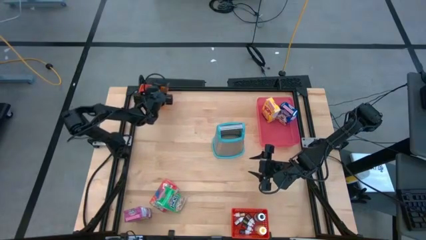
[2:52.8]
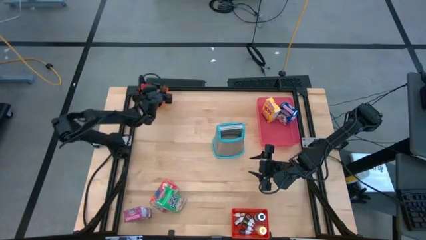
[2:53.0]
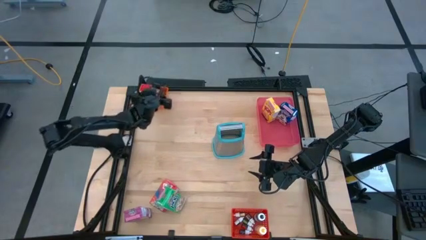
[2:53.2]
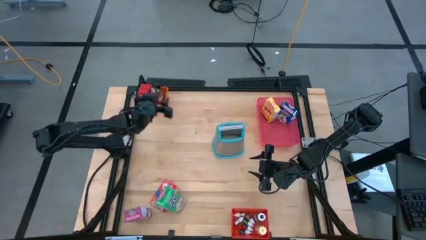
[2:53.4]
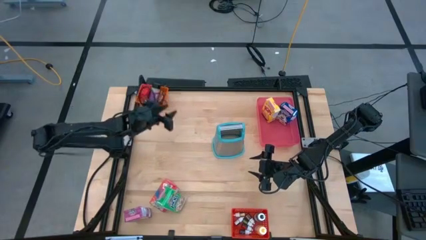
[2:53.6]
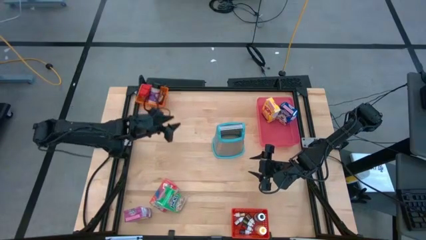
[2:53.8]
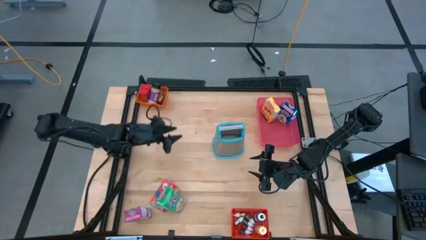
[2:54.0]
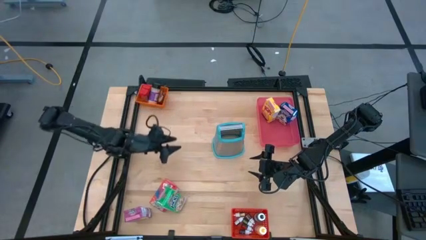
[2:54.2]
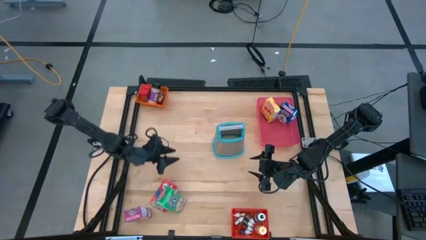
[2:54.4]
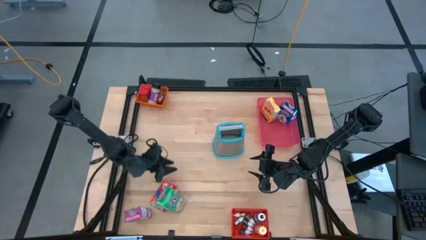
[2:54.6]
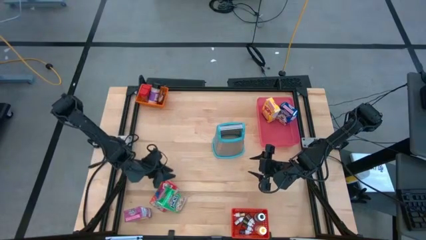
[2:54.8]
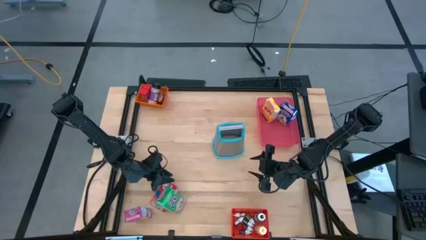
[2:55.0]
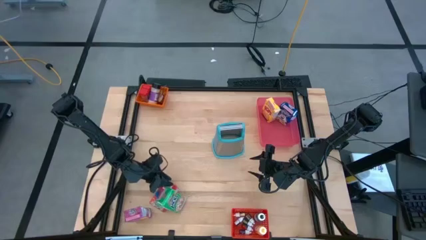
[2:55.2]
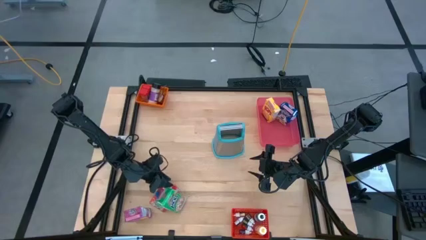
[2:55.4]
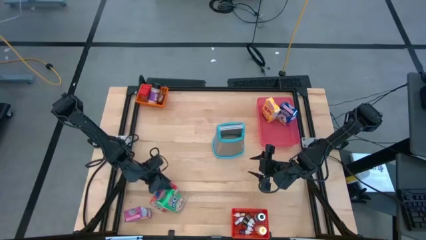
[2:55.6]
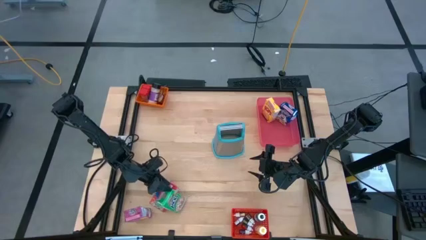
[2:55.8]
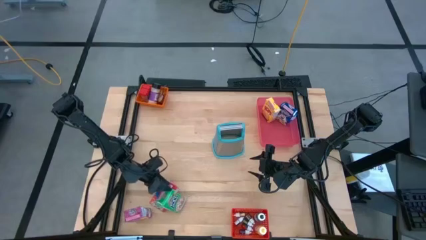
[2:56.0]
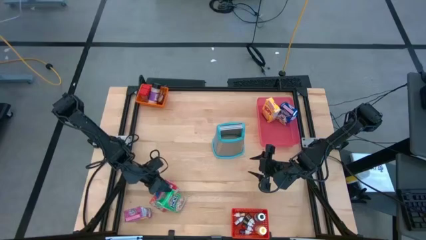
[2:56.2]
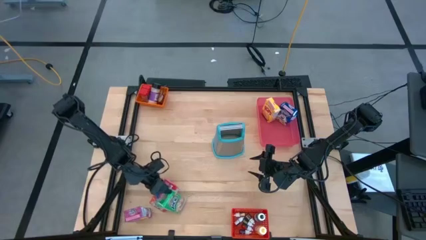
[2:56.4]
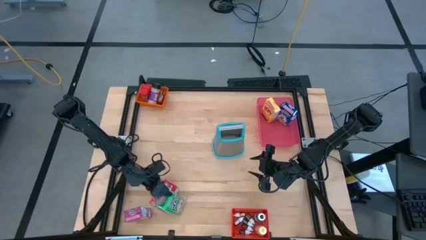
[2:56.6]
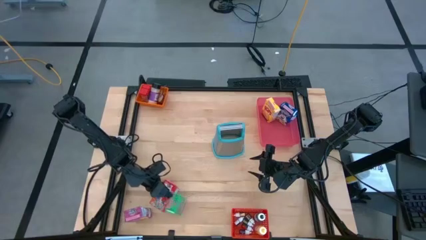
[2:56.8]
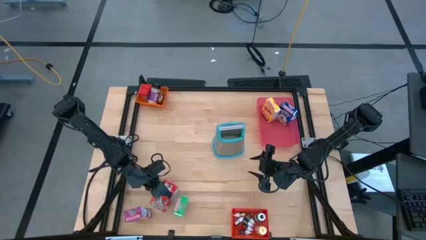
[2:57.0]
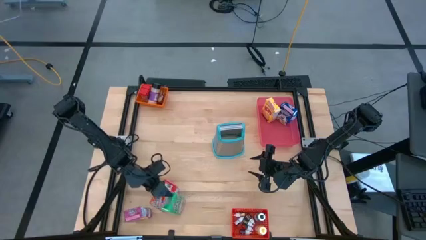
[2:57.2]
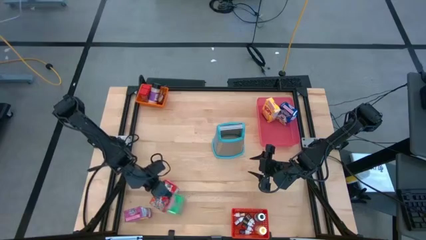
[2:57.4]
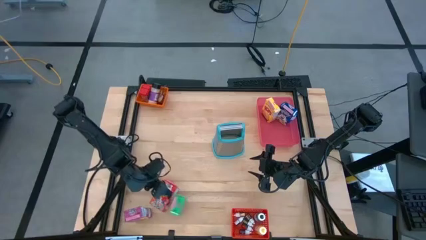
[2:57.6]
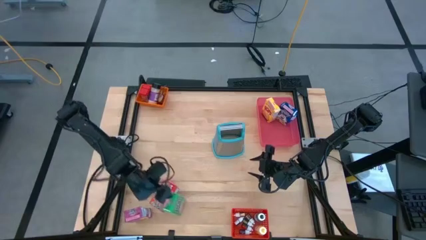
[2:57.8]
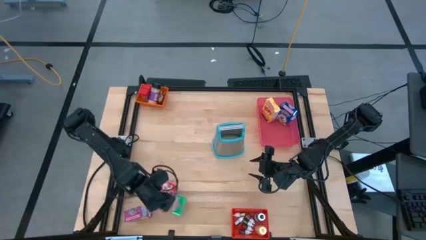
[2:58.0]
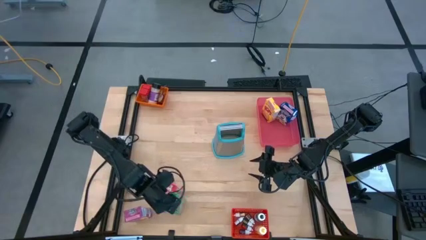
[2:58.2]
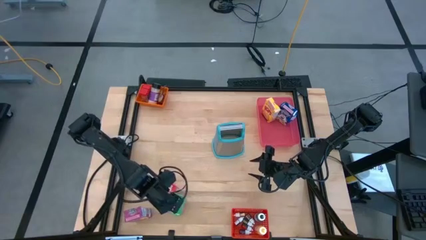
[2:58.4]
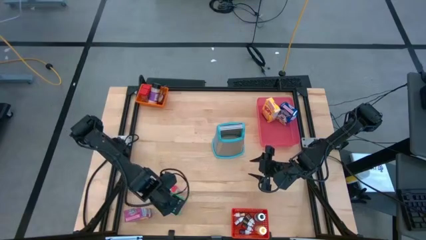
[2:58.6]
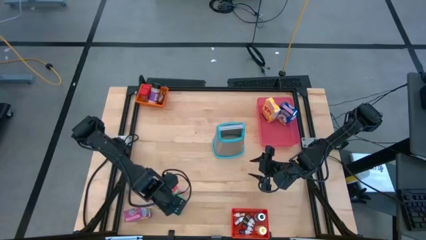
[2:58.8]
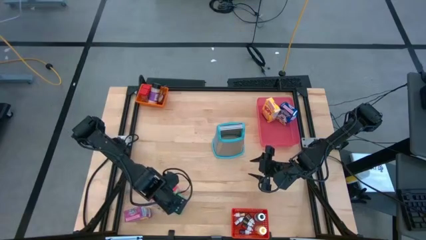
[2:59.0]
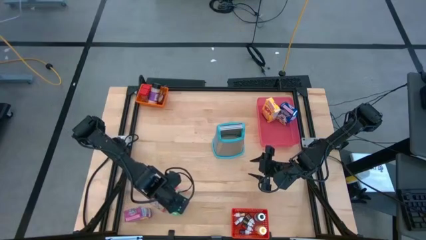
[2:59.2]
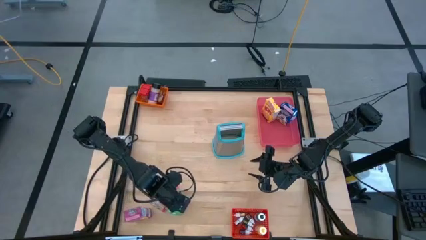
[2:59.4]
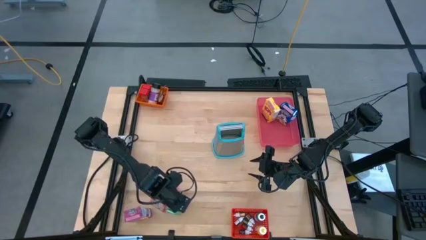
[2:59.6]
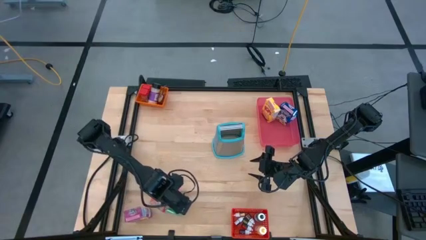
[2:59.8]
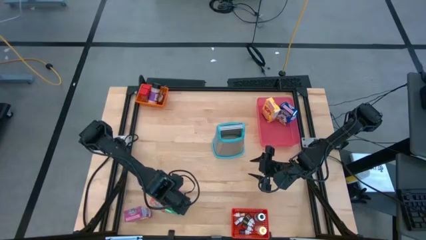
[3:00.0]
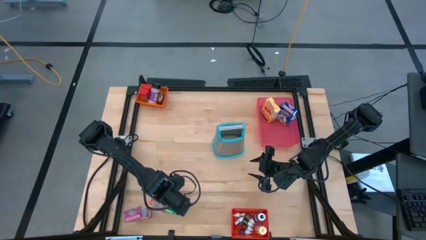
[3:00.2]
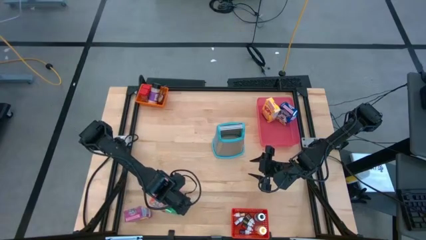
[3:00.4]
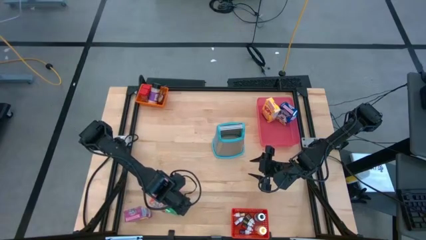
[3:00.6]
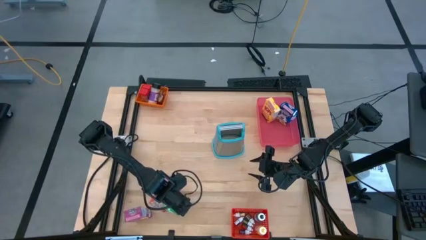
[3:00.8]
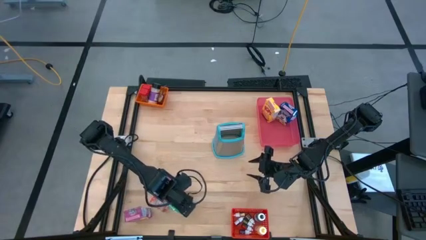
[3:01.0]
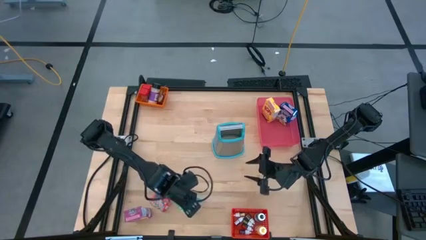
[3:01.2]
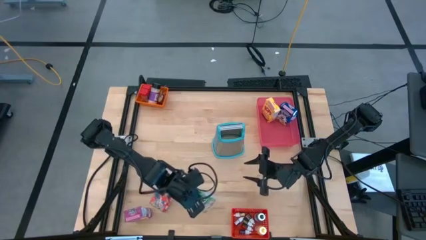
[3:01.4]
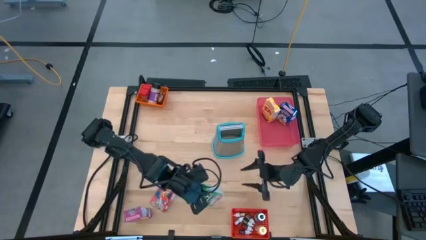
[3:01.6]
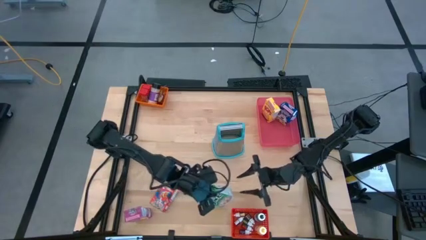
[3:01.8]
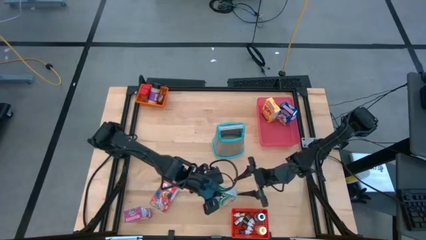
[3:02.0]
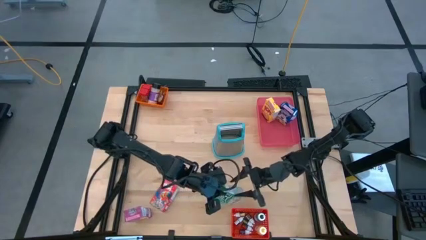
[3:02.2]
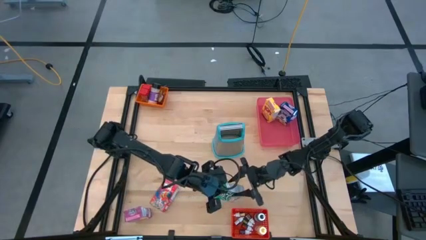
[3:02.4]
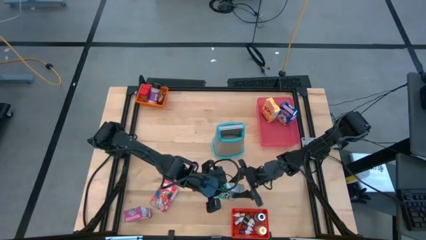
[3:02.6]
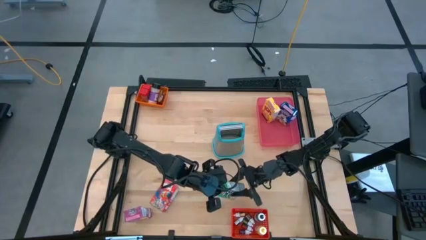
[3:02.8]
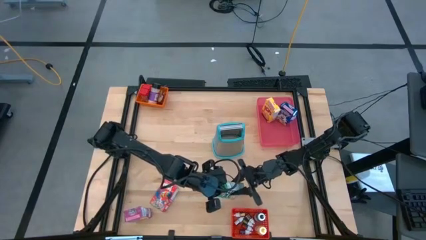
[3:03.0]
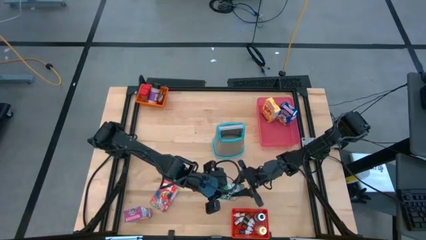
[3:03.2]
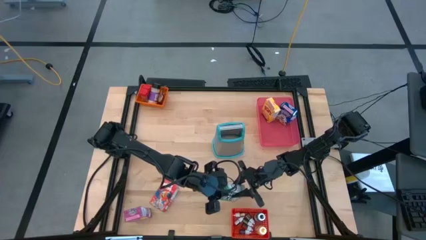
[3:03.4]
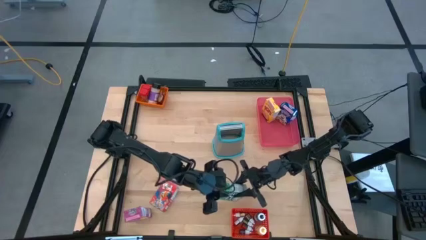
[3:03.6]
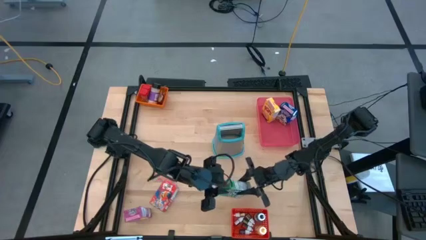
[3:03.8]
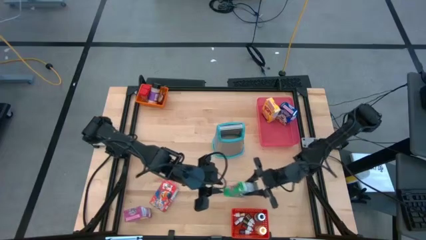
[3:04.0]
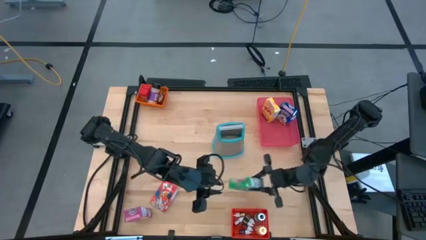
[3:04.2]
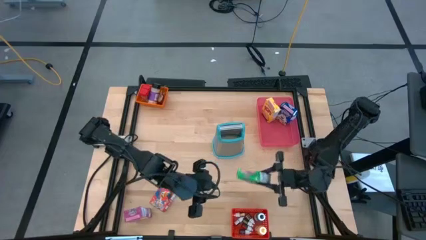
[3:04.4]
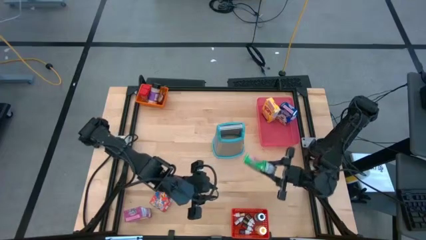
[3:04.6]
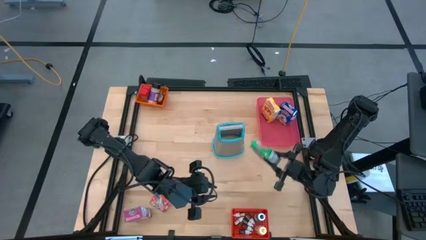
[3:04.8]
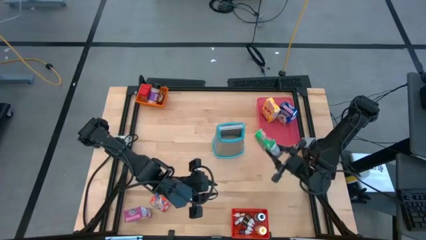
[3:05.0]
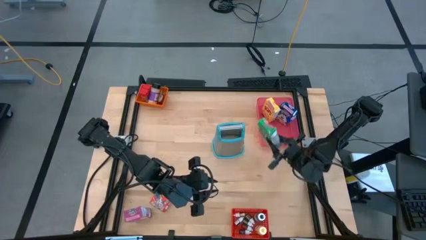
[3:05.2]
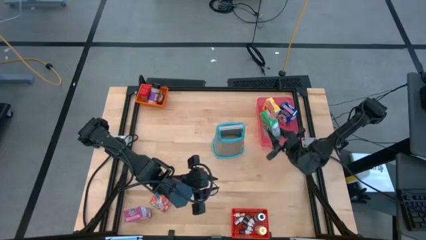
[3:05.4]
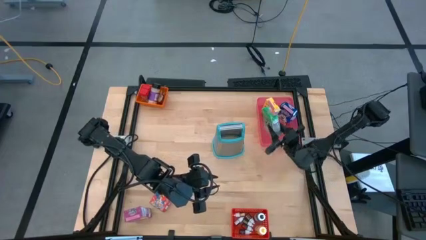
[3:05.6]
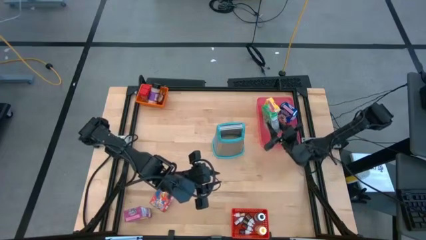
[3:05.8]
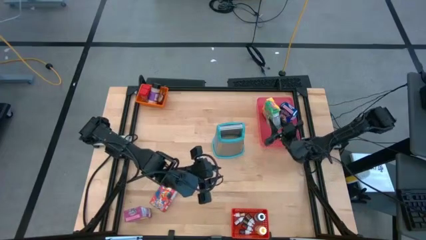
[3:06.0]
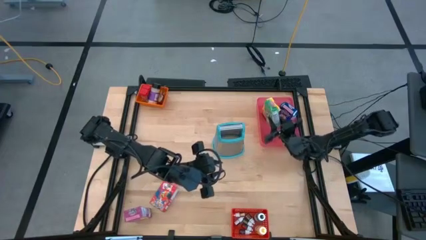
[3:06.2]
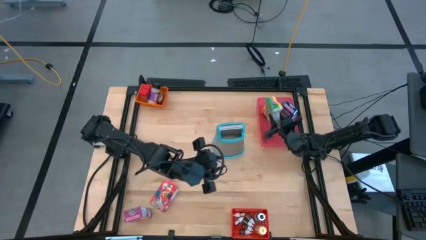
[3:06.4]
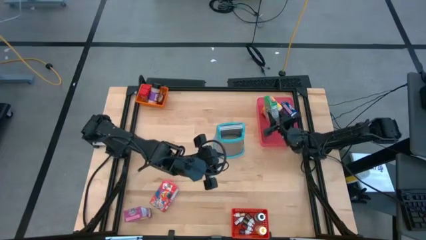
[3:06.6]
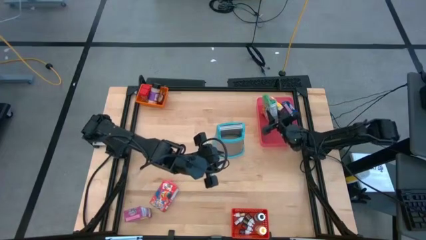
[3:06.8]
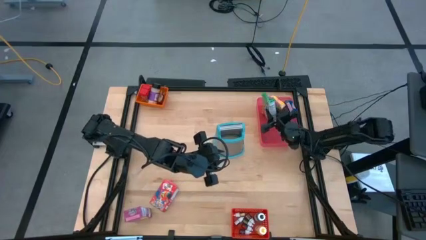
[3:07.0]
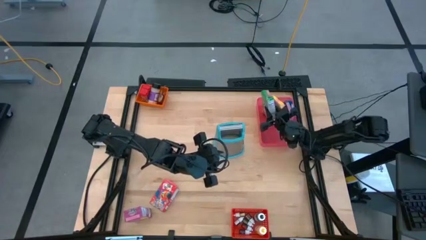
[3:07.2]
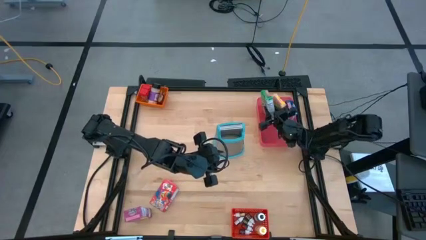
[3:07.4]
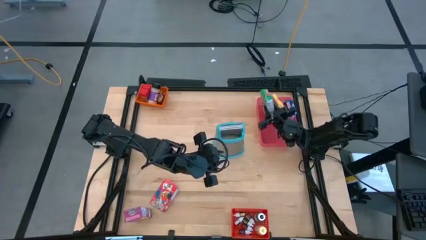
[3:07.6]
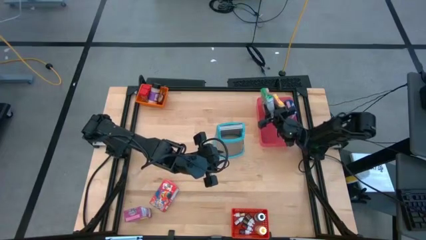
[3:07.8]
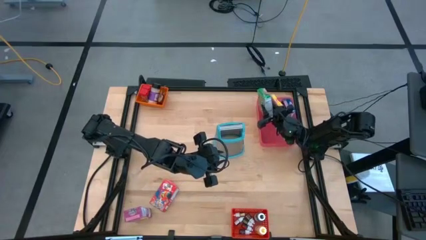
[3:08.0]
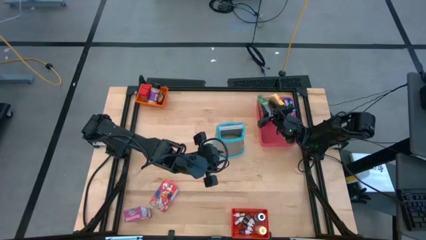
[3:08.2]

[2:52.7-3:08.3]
Task: Pick & Place Kitchen Items
Put the green cereal box into the pink bin
